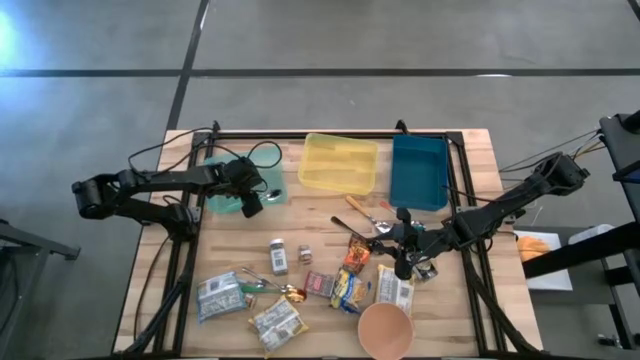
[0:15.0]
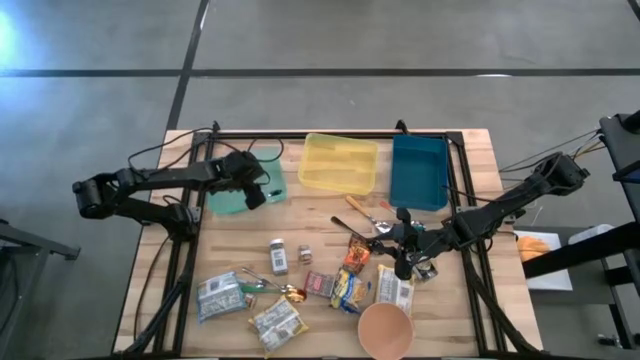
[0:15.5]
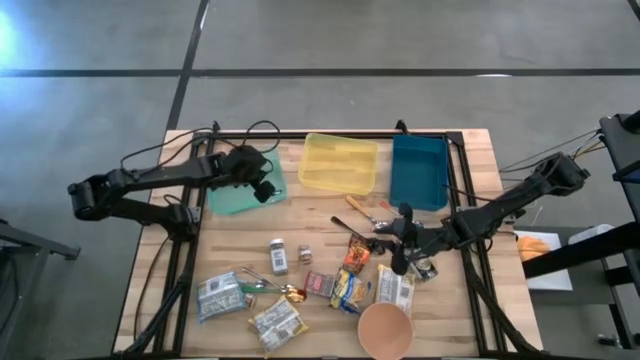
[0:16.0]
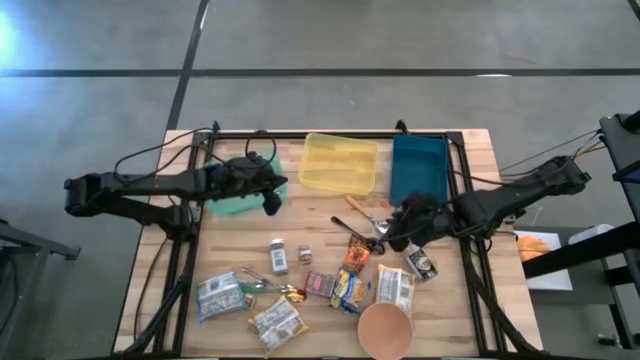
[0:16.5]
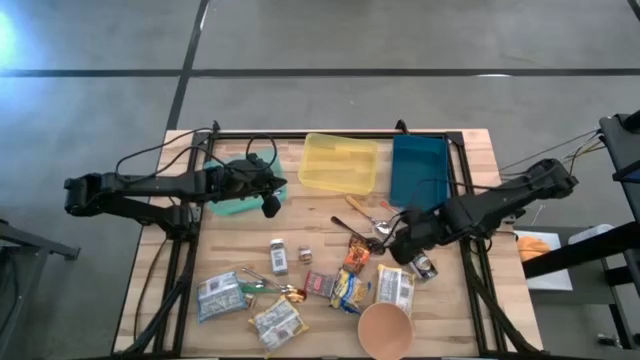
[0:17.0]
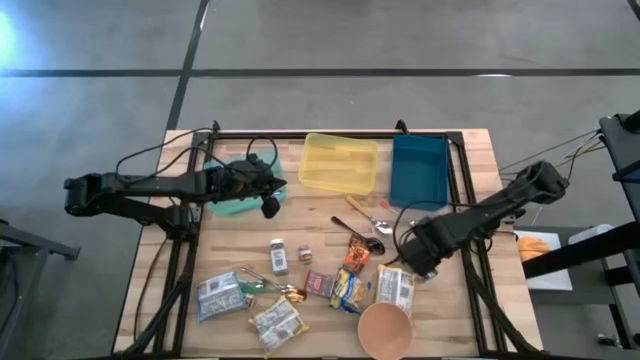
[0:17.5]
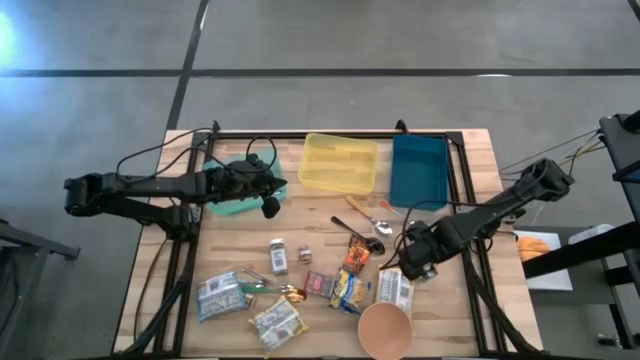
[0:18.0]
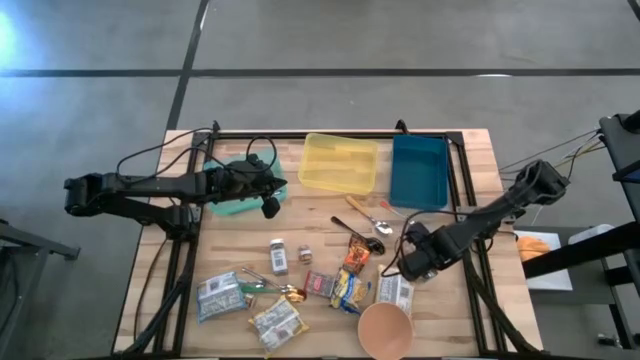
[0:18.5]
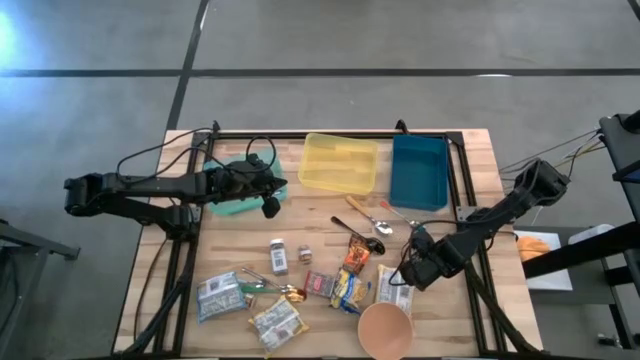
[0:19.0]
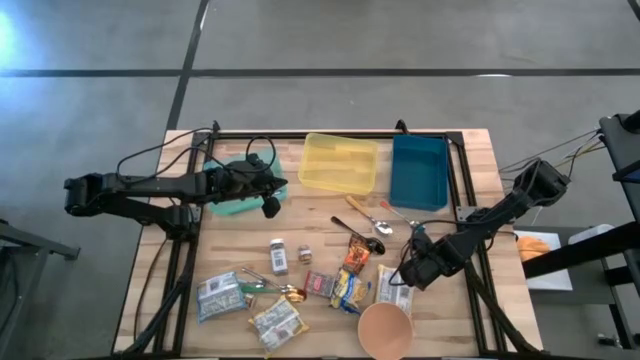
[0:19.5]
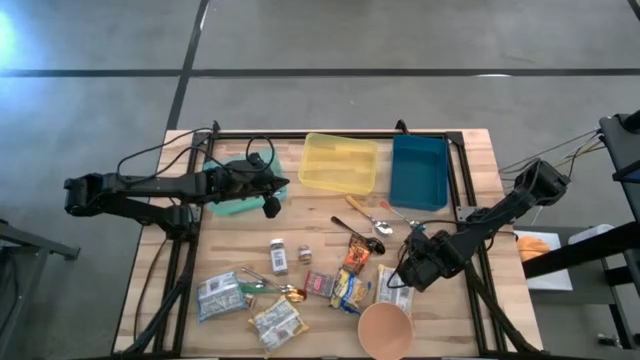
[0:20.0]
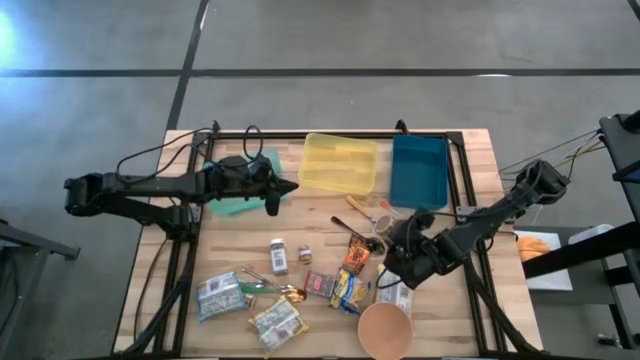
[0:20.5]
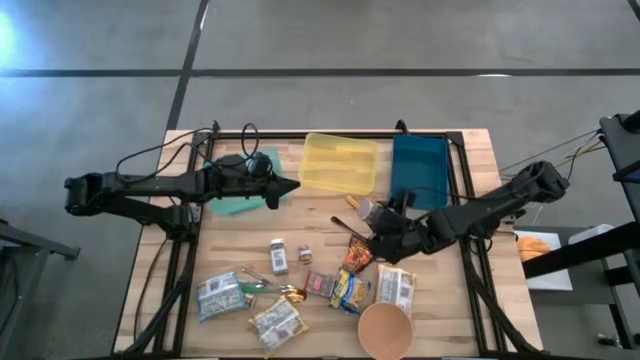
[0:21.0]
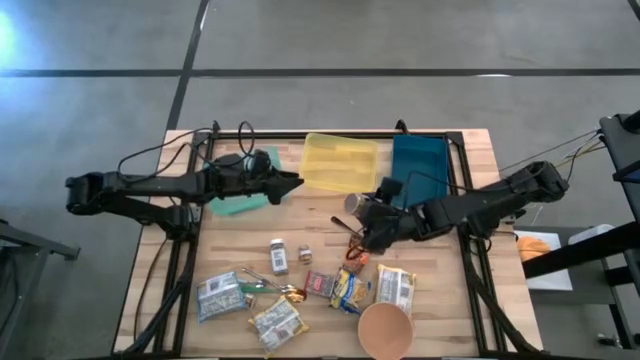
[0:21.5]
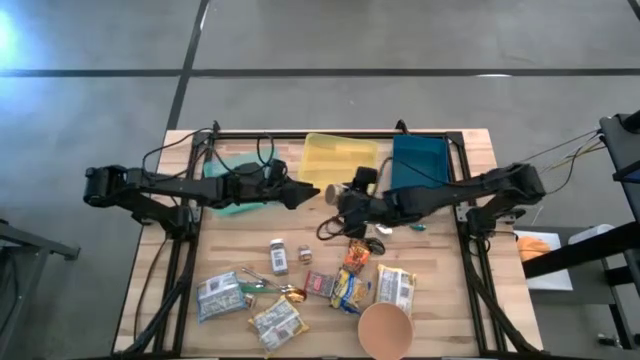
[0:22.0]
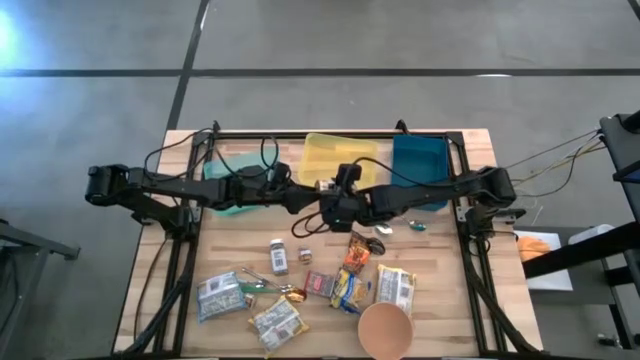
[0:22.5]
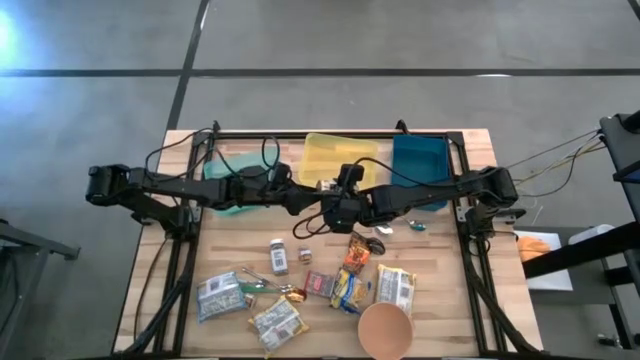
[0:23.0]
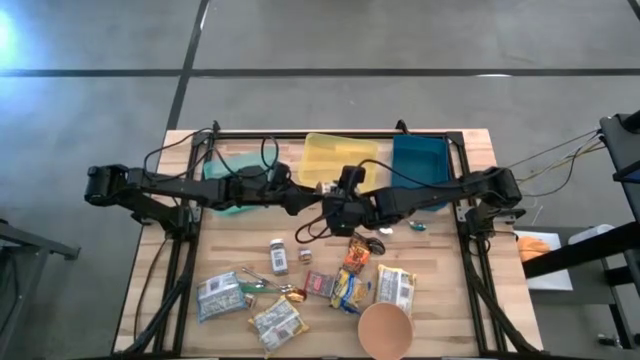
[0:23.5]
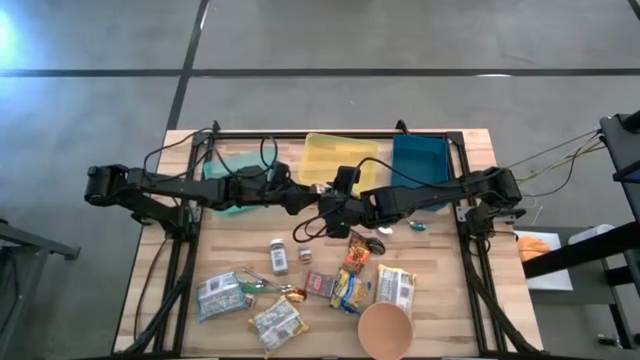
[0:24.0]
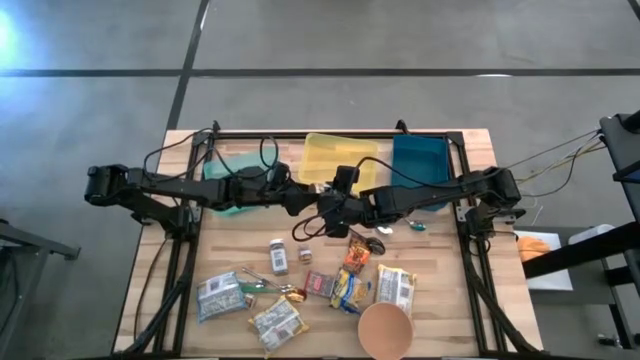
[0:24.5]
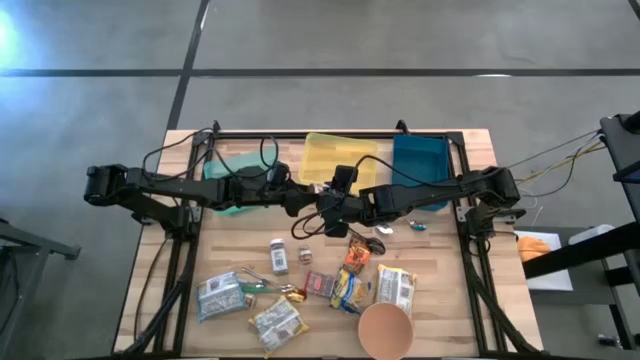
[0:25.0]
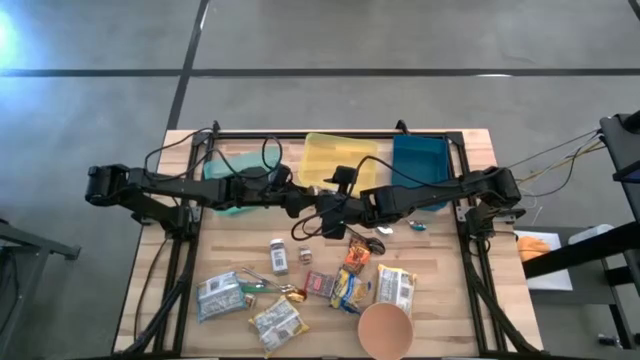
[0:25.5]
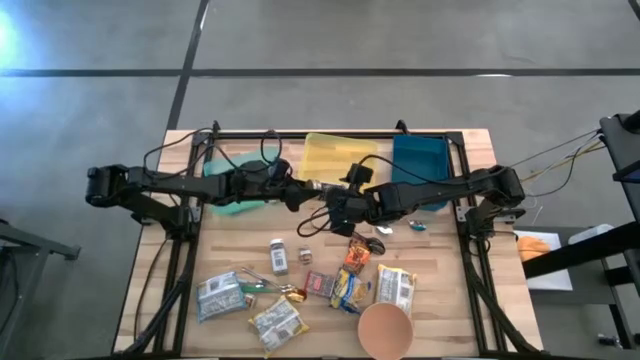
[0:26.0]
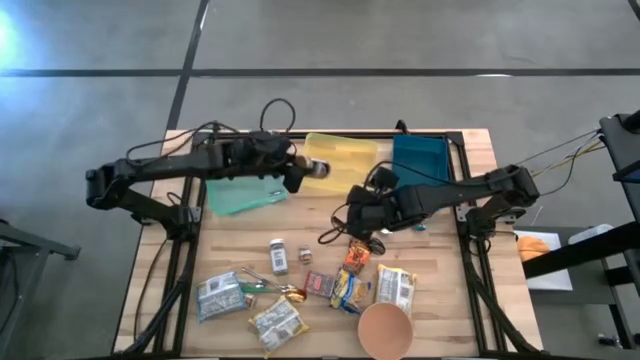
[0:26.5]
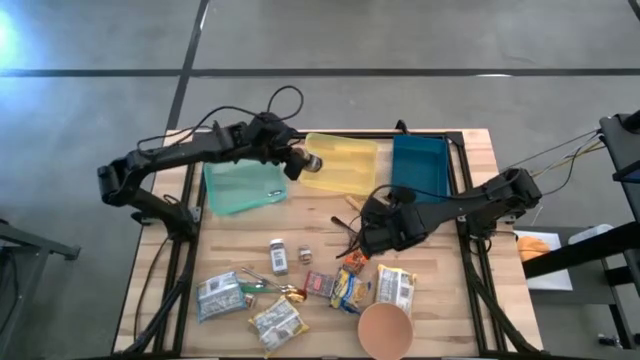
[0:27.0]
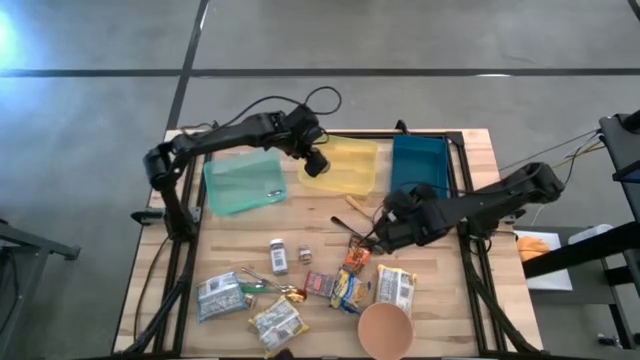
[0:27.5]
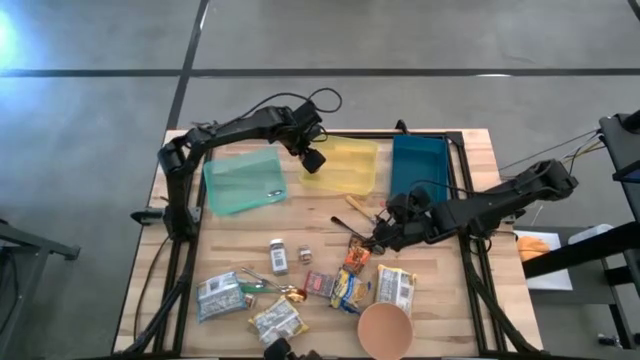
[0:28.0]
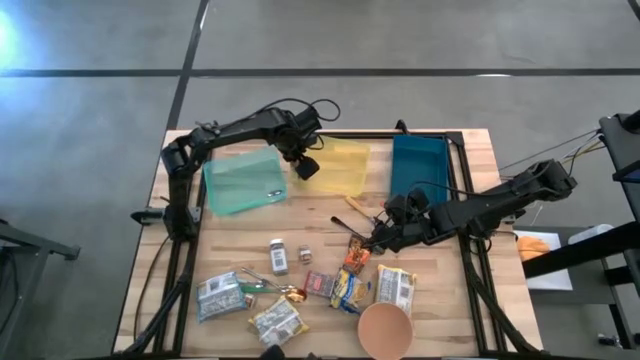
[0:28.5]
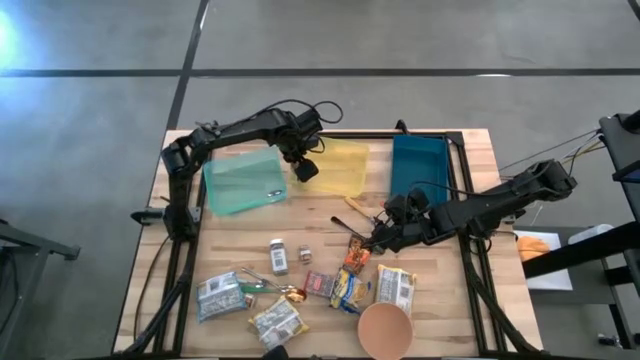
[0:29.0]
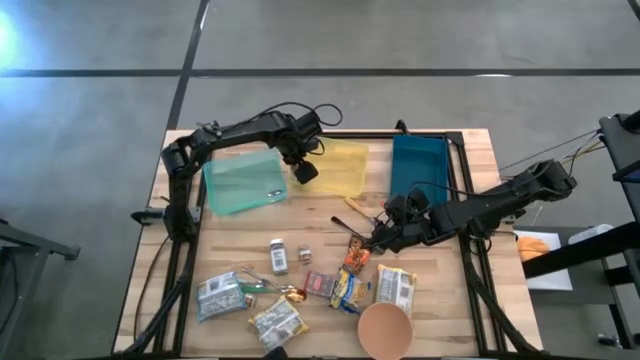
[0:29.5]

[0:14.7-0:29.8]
Put the gold seasoning bottle into the yellow bin
